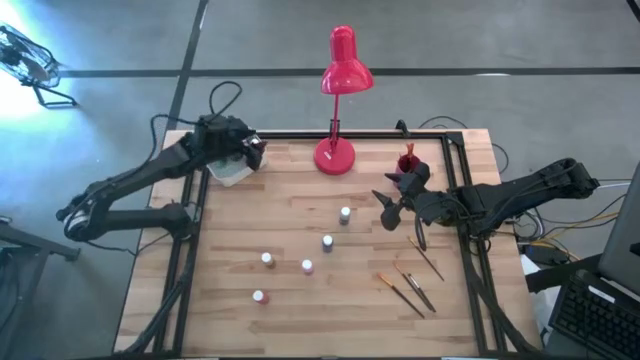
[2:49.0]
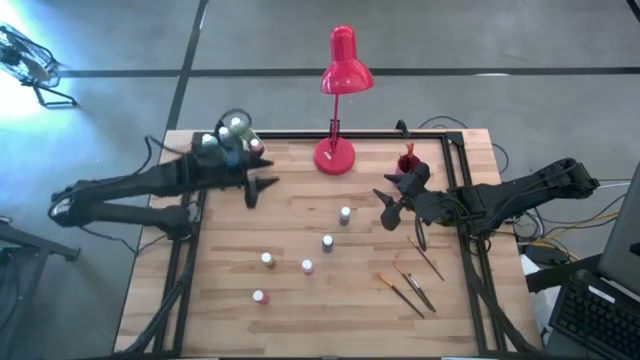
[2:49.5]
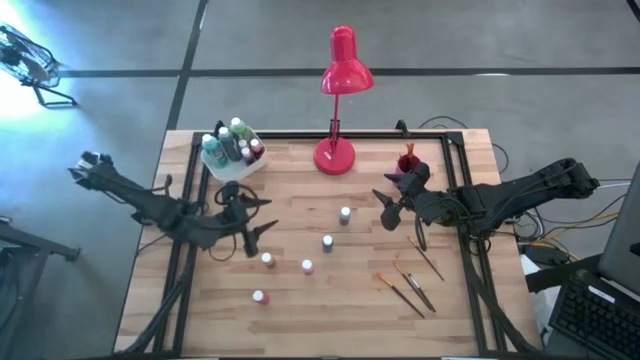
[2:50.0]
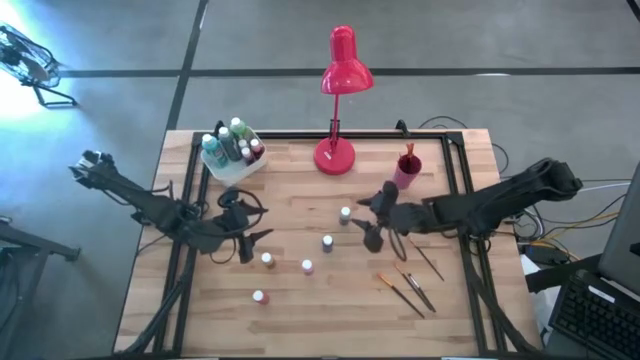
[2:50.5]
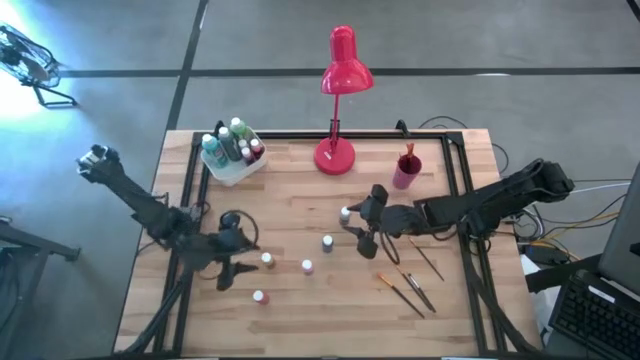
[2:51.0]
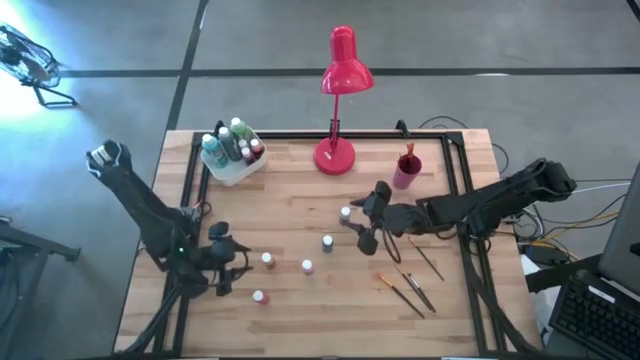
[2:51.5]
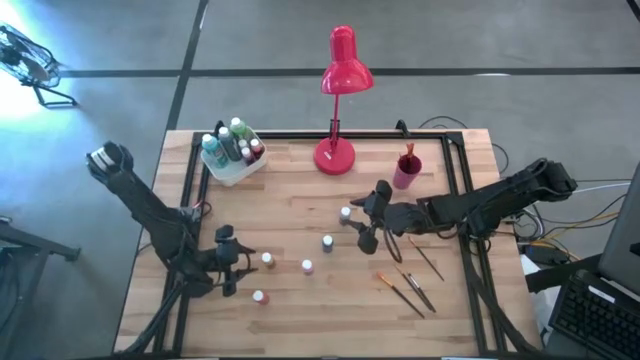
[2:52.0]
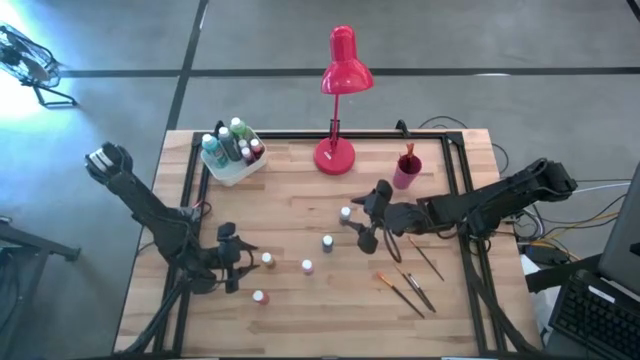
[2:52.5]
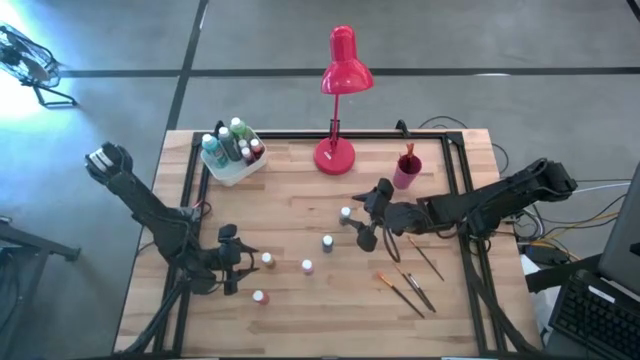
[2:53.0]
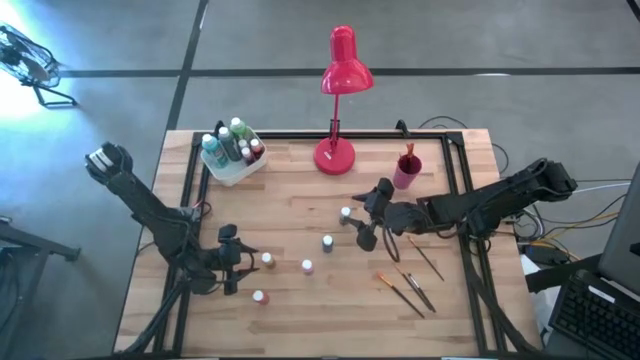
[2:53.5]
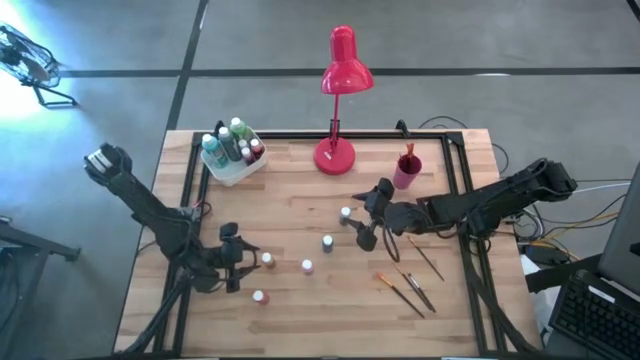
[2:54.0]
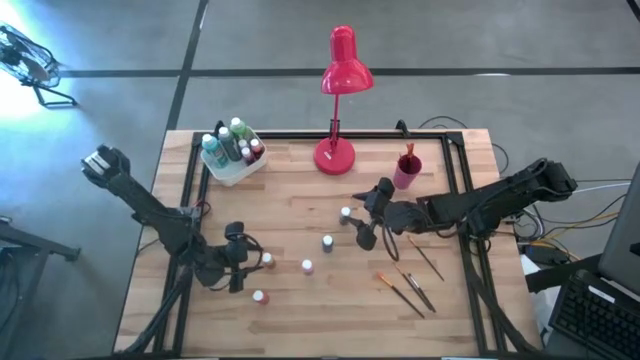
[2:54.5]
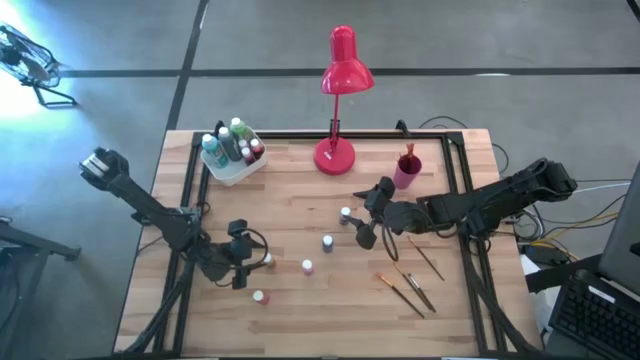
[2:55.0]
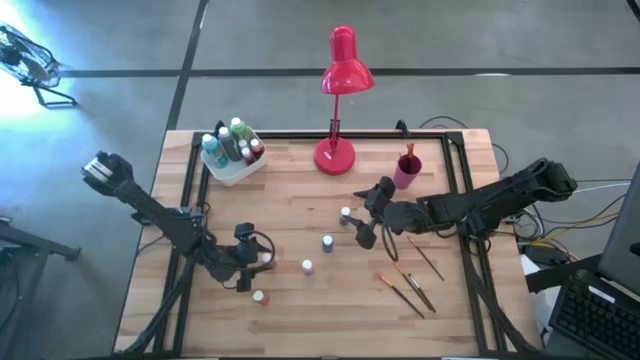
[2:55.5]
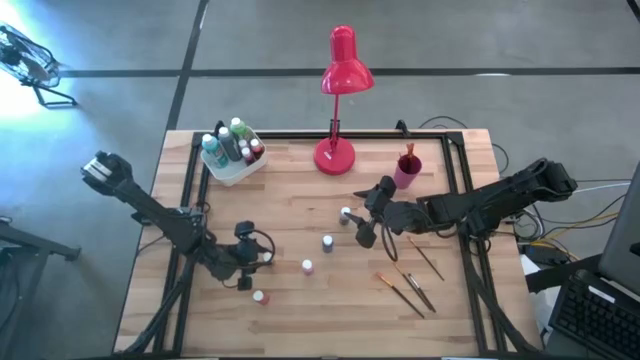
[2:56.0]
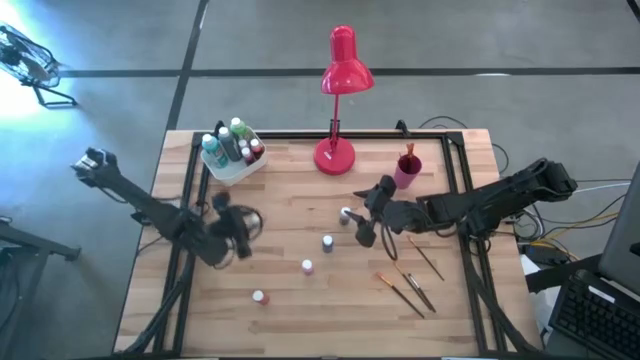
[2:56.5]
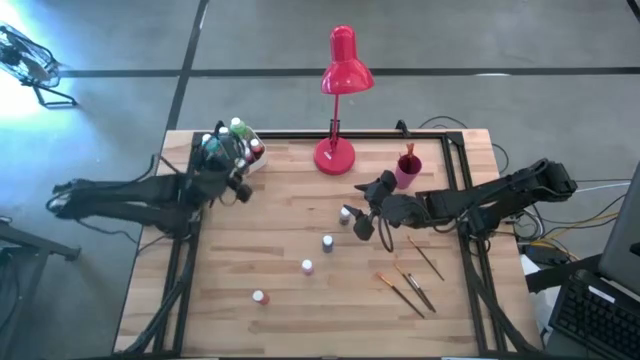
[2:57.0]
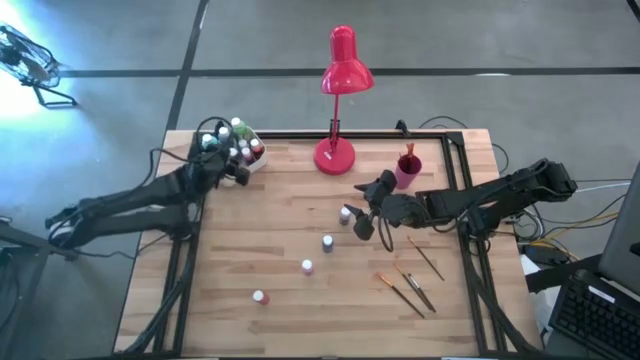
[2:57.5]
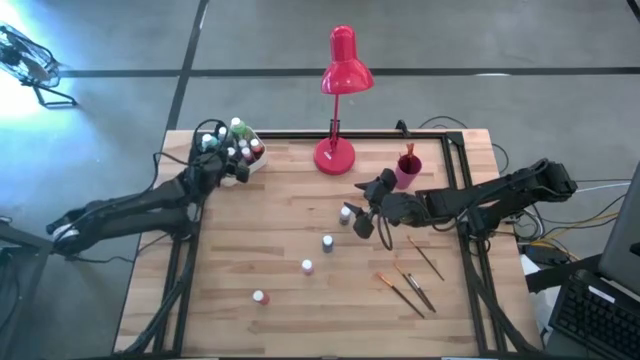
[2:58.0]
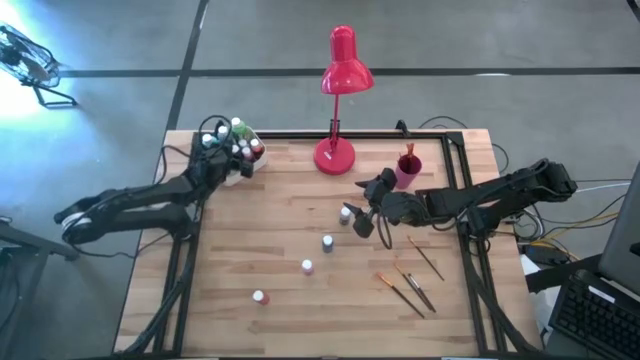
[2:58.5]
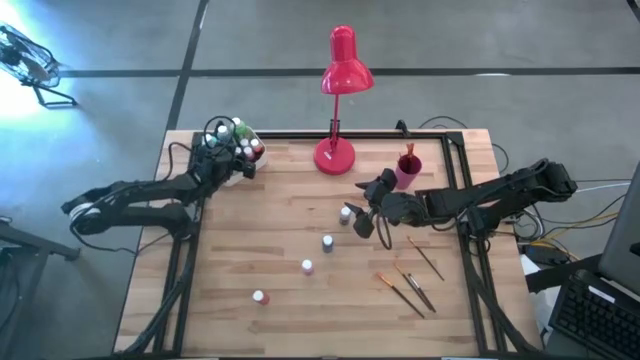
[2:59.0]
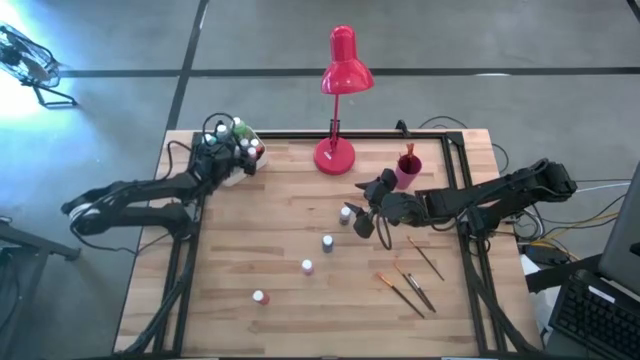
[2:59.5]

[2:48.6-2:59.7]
Task: Pick & Place Paint Supplies
Put the yellow paint bottle into the white bin

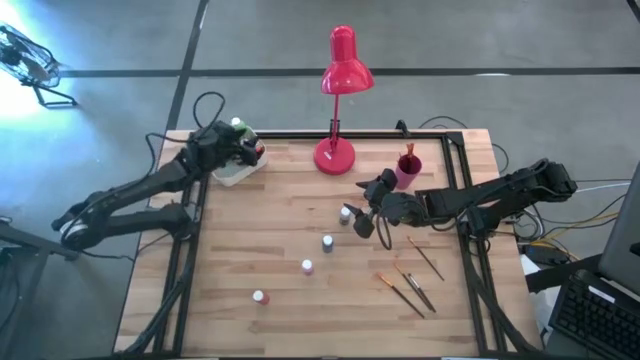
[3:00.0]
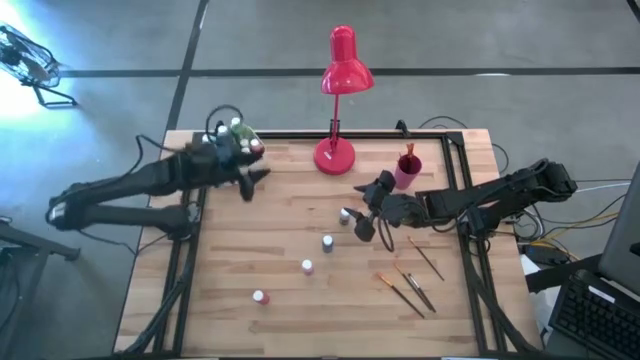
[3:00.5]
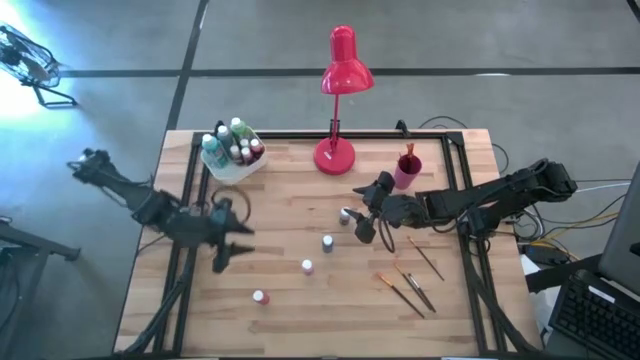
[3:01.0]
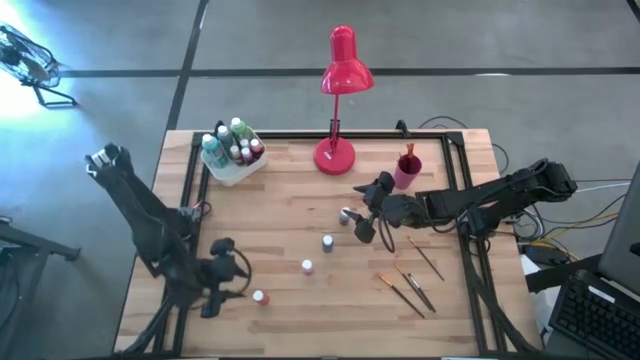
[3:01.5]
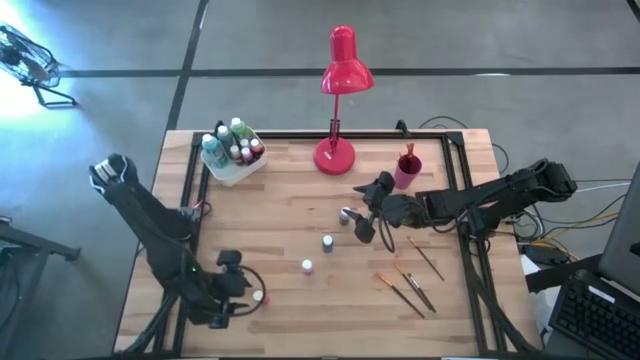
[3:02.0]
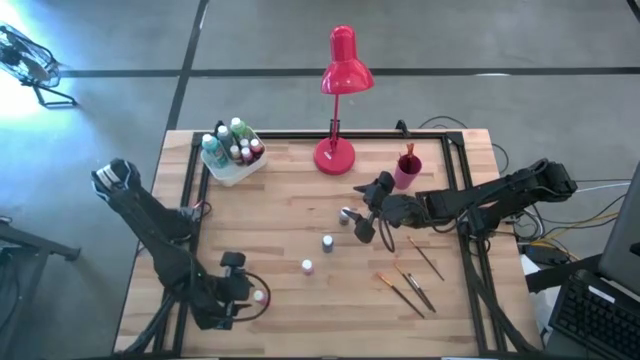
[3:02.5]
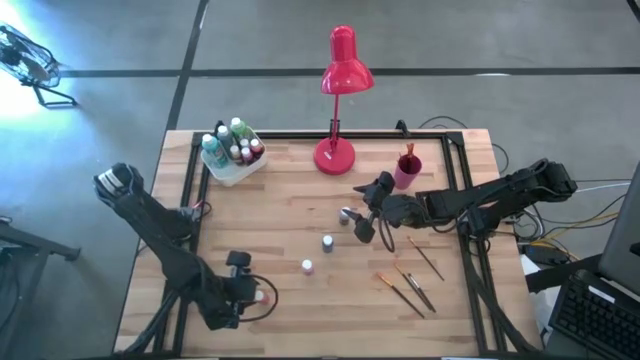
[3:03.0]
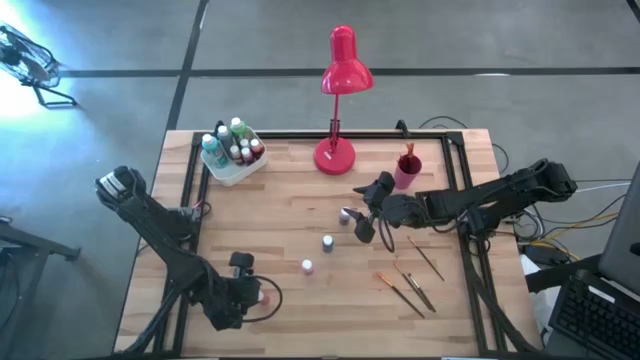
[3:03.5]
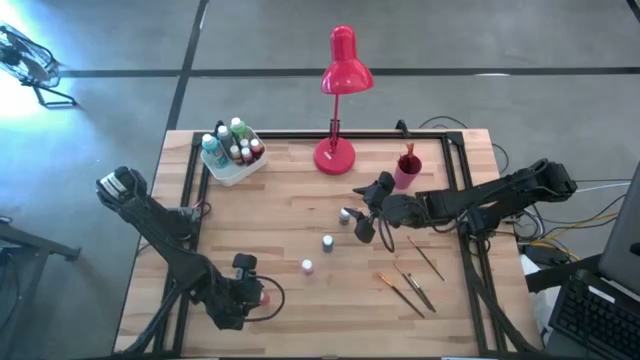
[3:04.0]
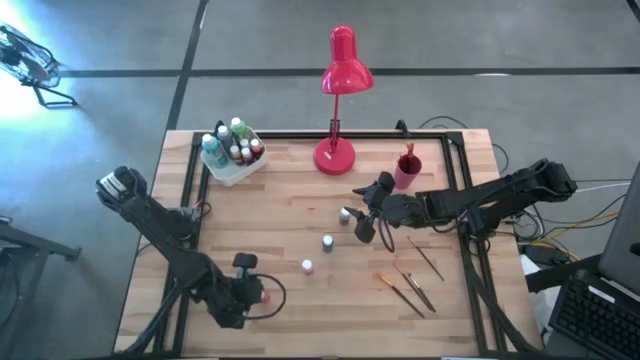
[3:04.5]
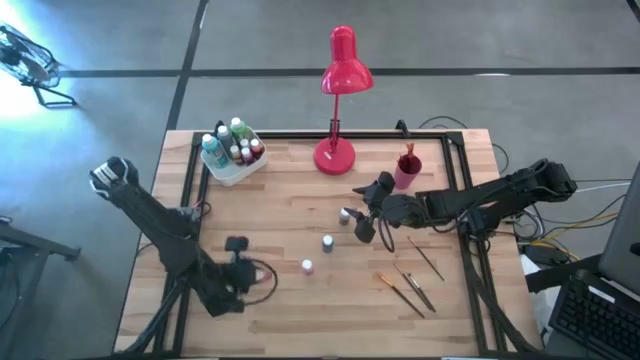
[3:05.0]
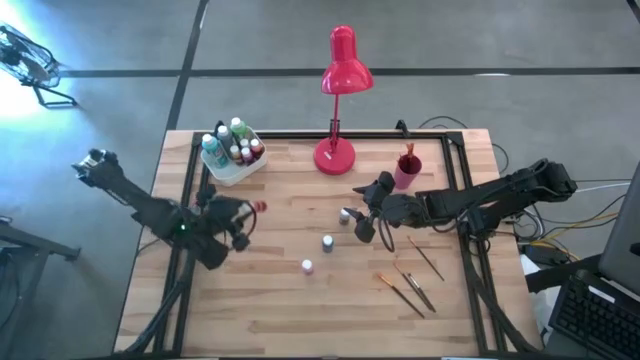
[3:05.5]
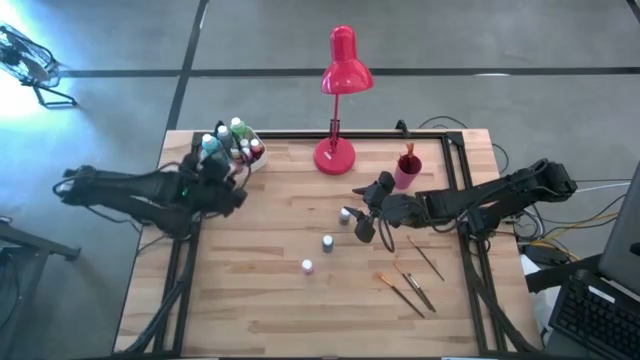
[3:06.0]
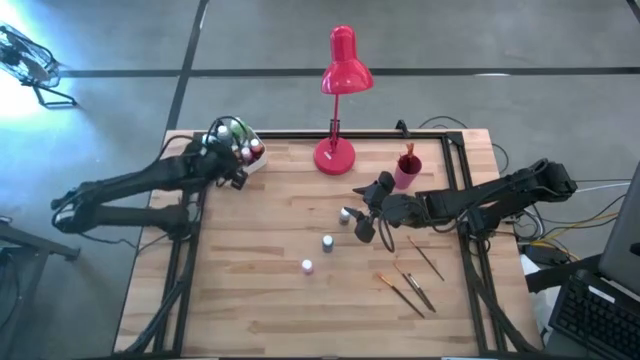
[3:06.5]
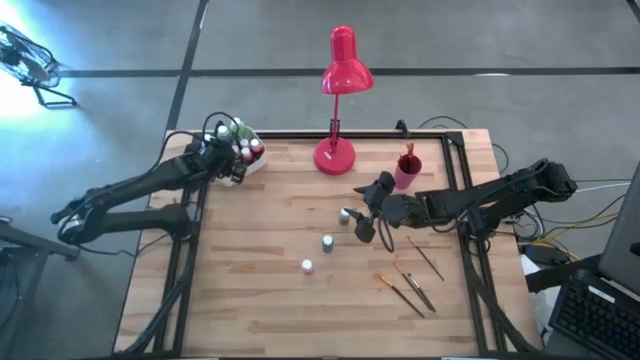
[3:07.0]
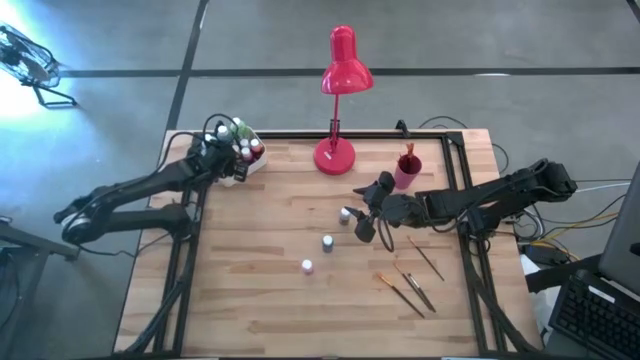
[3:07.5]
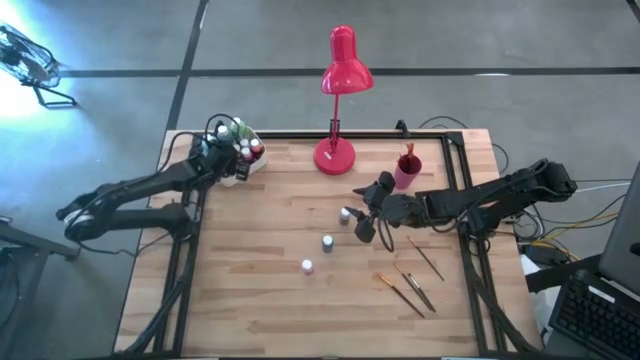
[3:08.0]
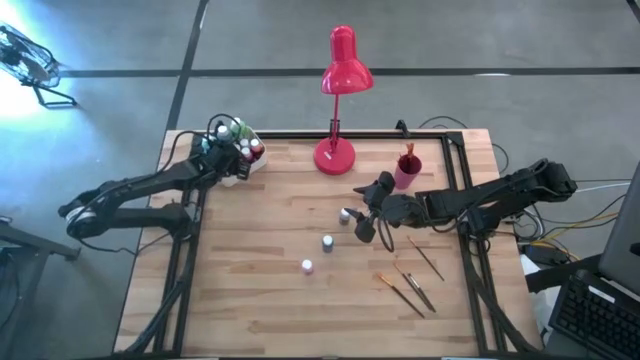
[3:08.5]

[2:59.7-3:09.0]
Put the orange paint bottle into the white bin
